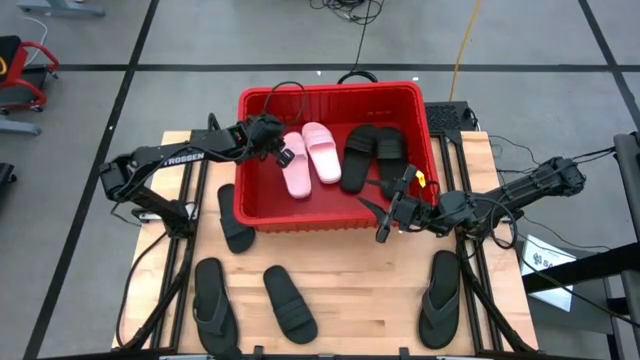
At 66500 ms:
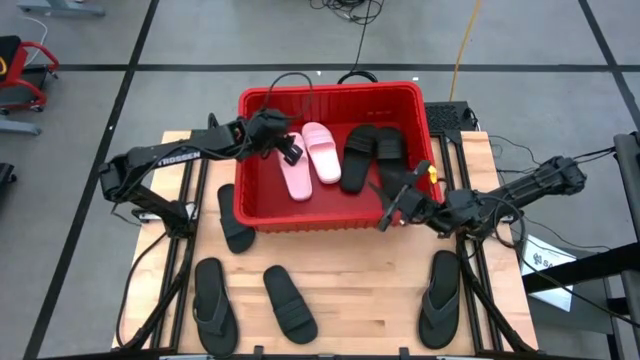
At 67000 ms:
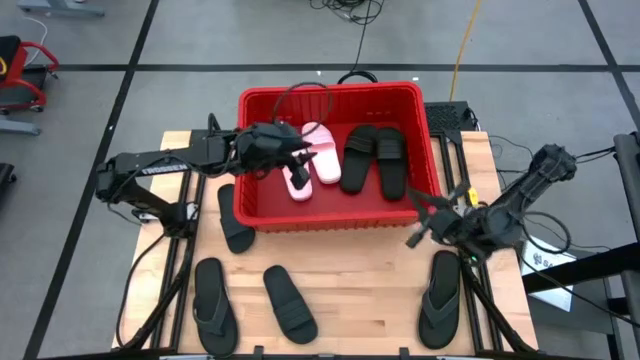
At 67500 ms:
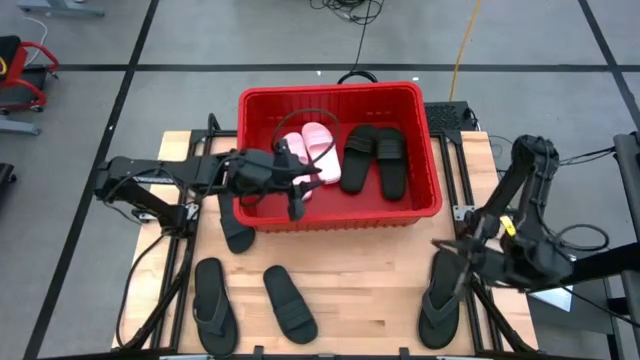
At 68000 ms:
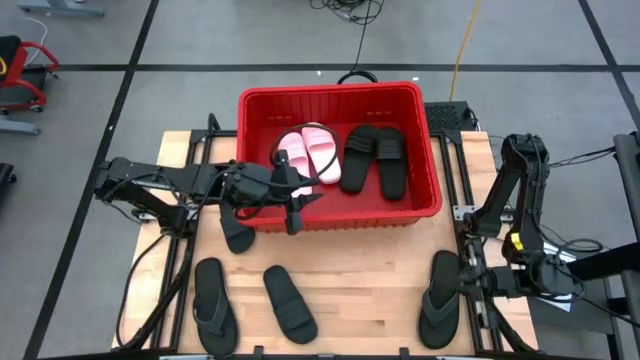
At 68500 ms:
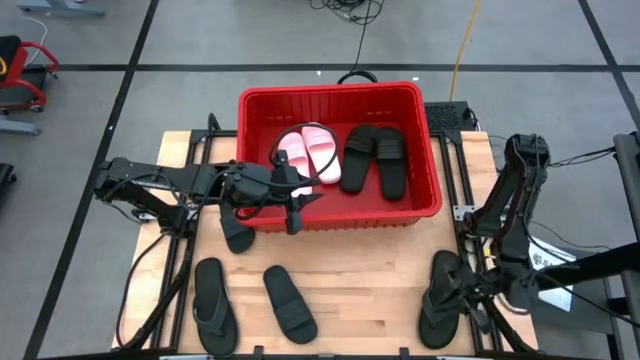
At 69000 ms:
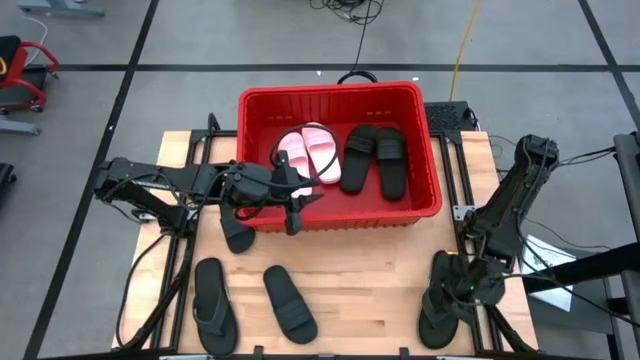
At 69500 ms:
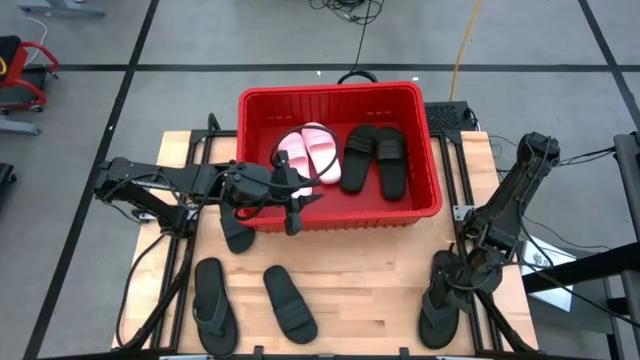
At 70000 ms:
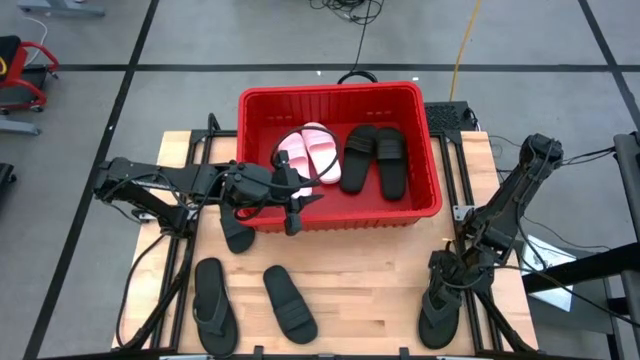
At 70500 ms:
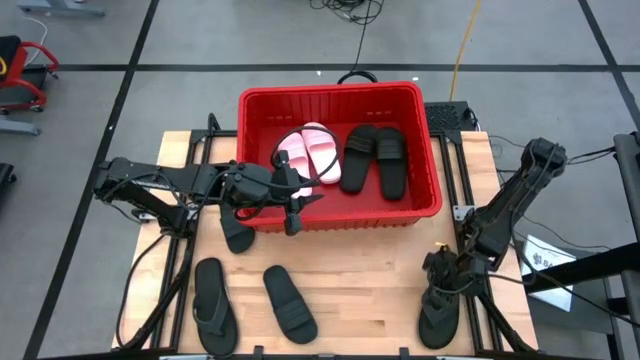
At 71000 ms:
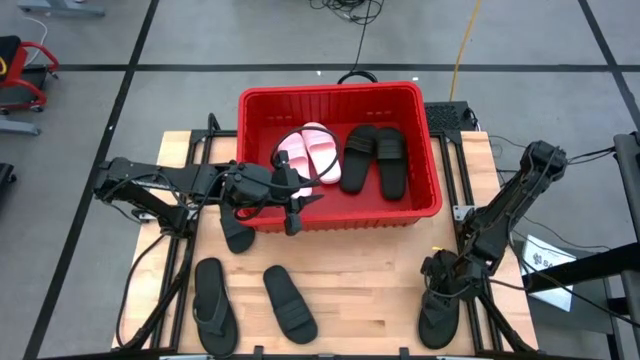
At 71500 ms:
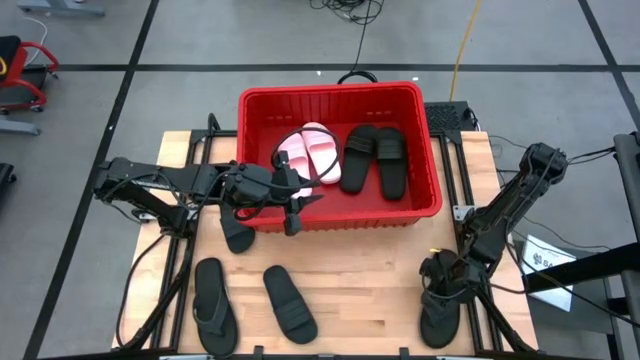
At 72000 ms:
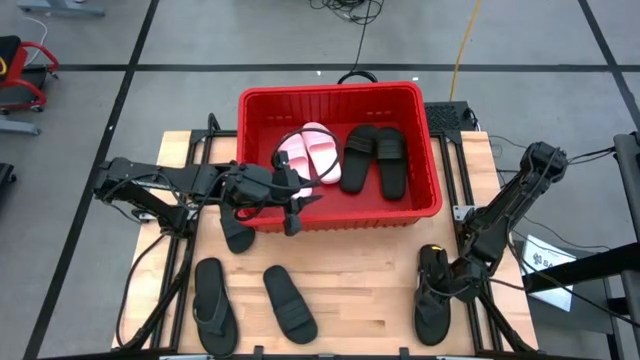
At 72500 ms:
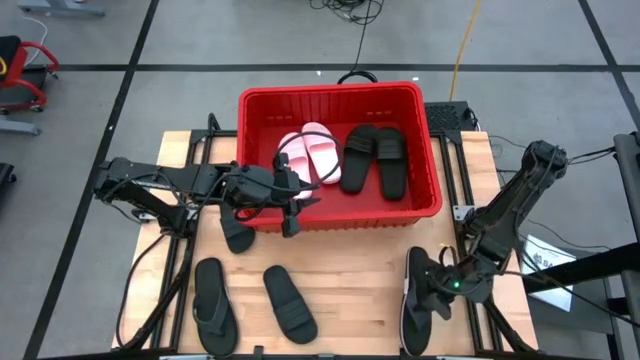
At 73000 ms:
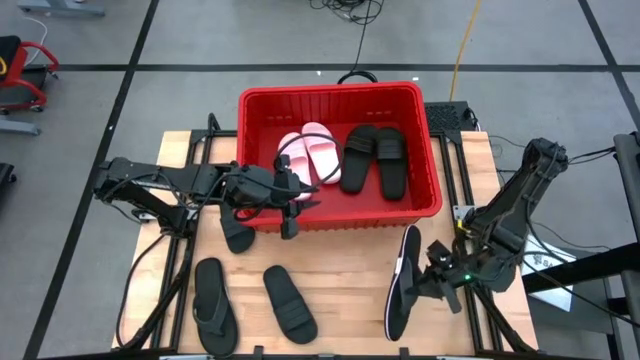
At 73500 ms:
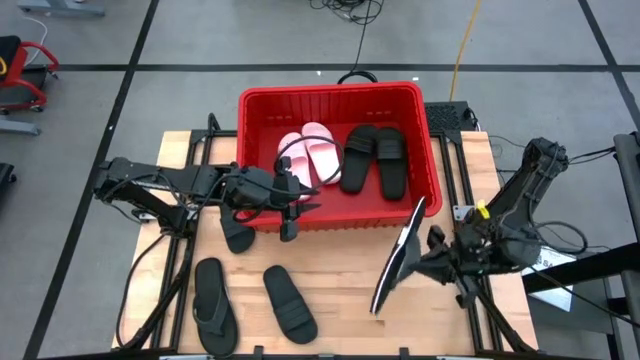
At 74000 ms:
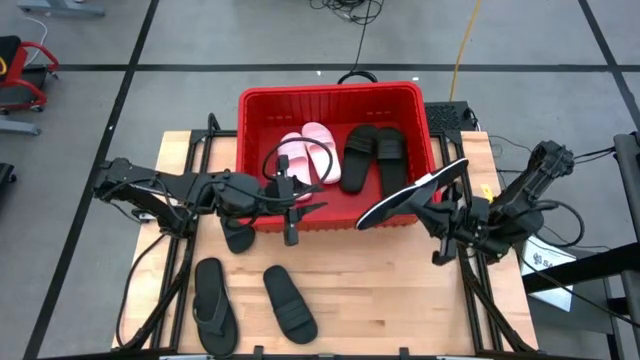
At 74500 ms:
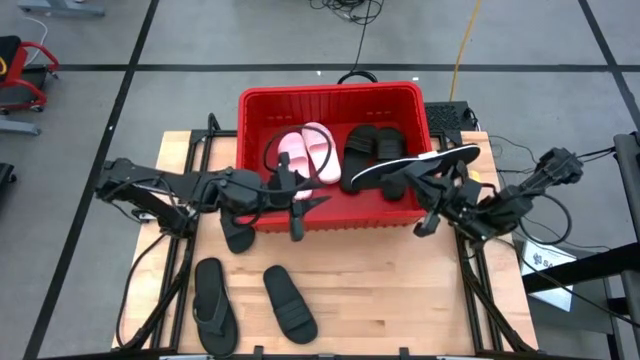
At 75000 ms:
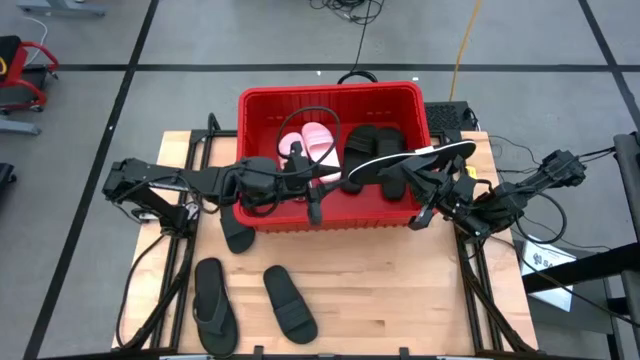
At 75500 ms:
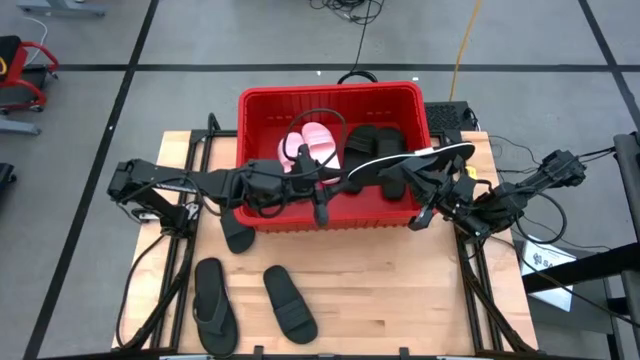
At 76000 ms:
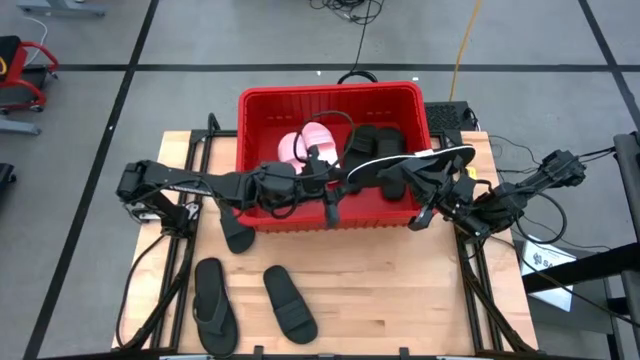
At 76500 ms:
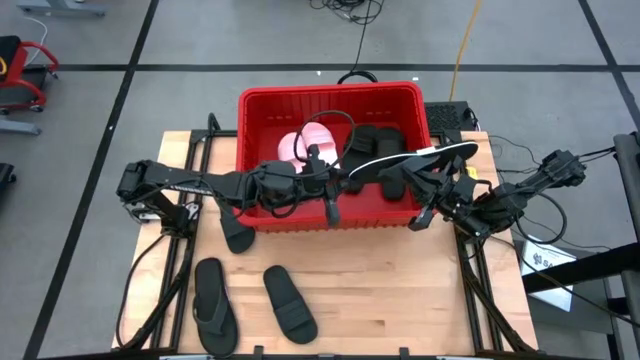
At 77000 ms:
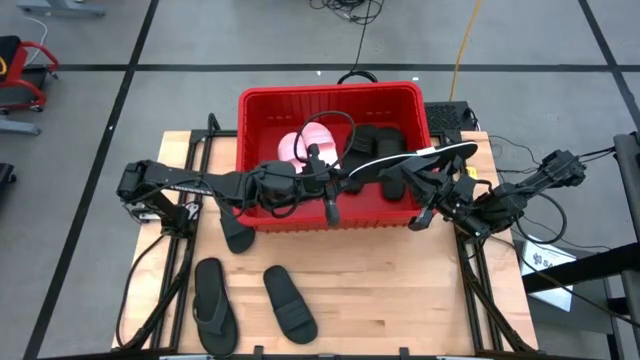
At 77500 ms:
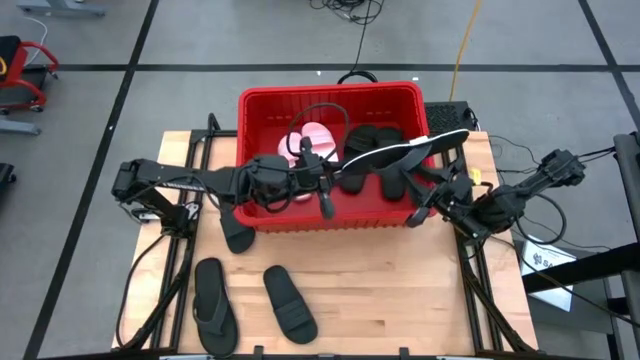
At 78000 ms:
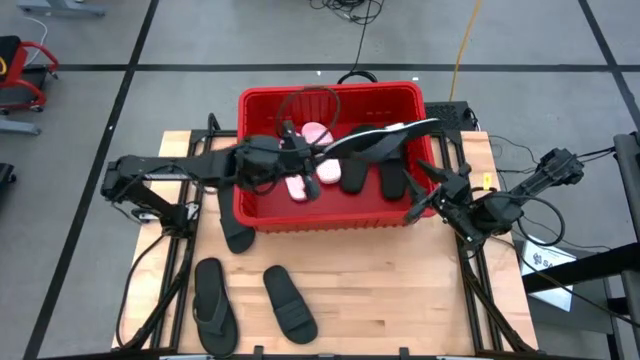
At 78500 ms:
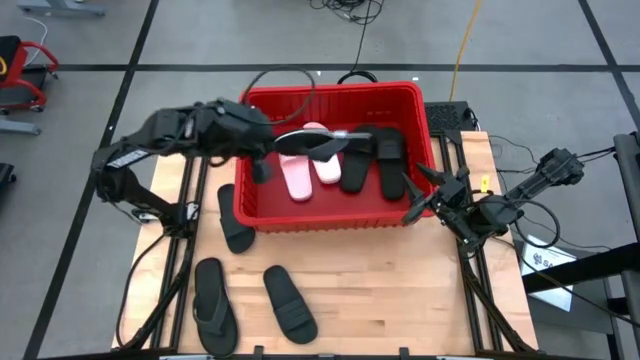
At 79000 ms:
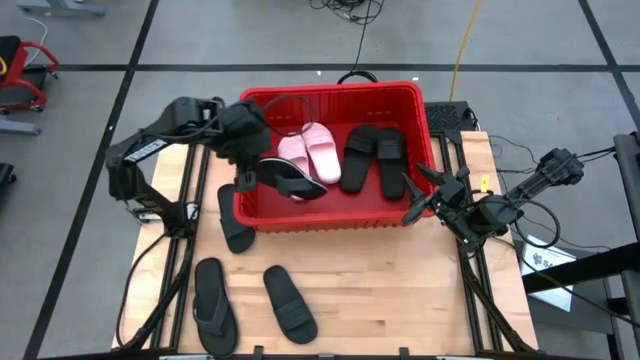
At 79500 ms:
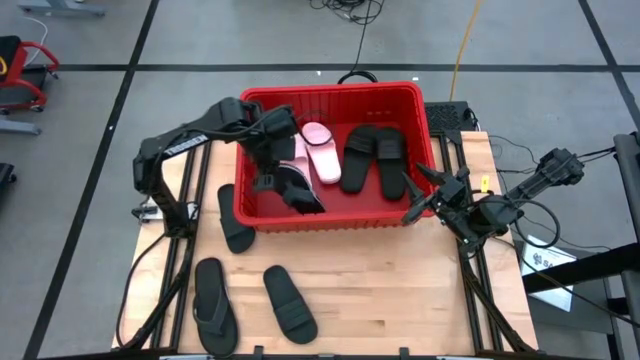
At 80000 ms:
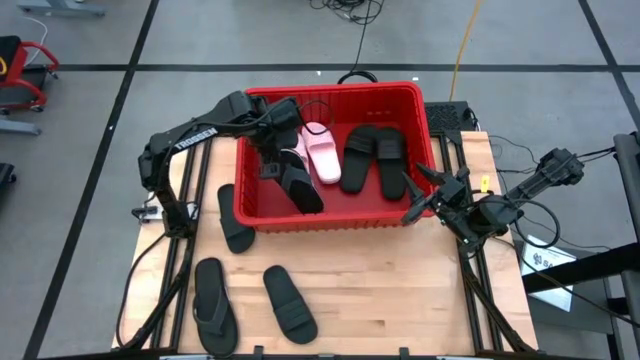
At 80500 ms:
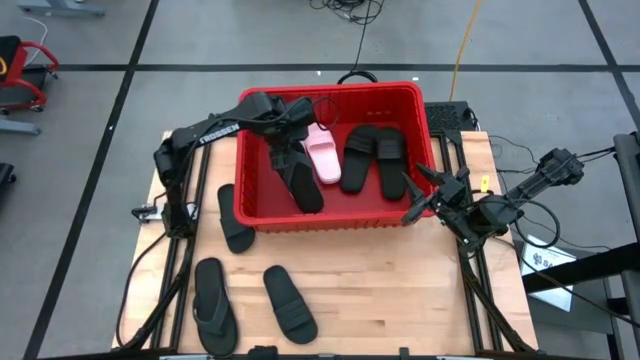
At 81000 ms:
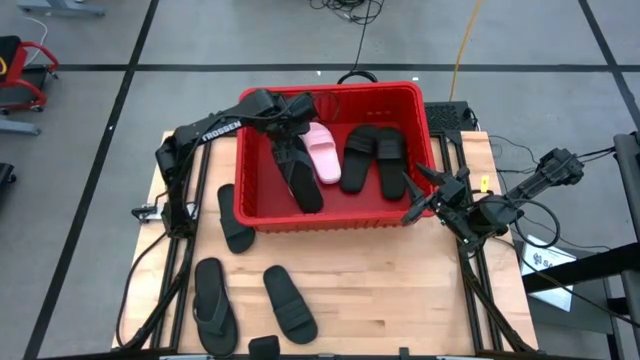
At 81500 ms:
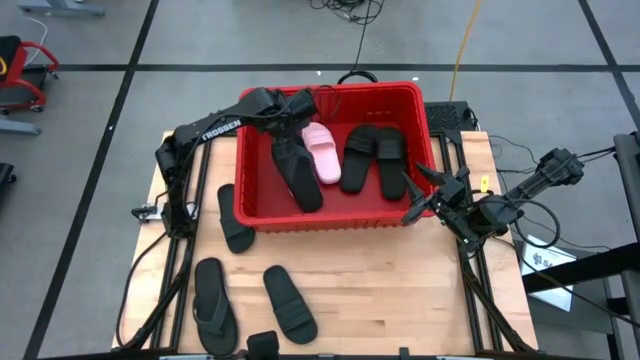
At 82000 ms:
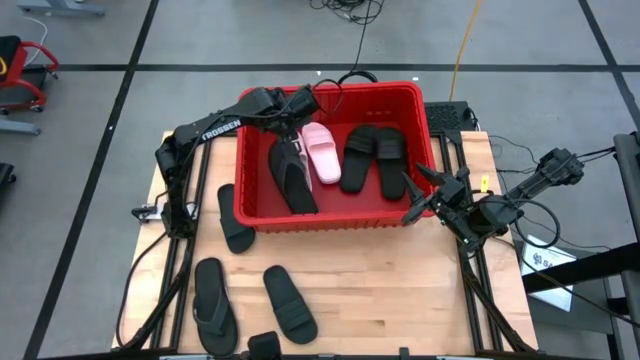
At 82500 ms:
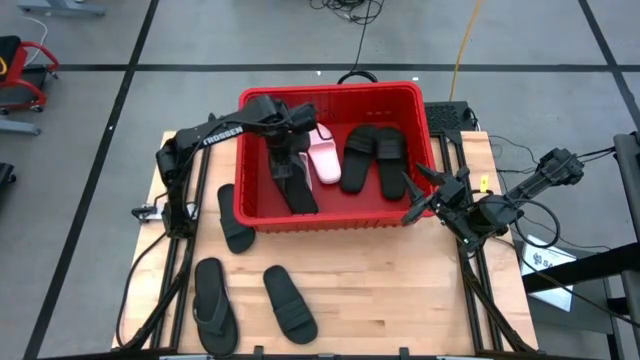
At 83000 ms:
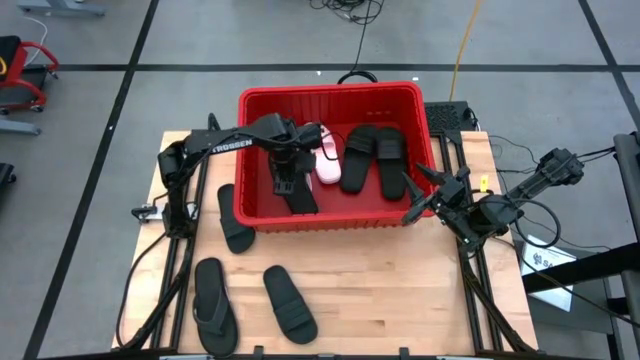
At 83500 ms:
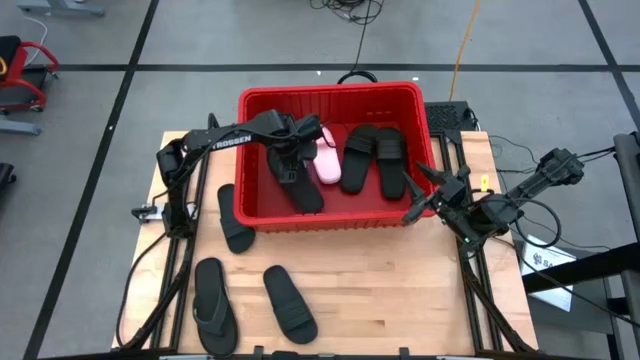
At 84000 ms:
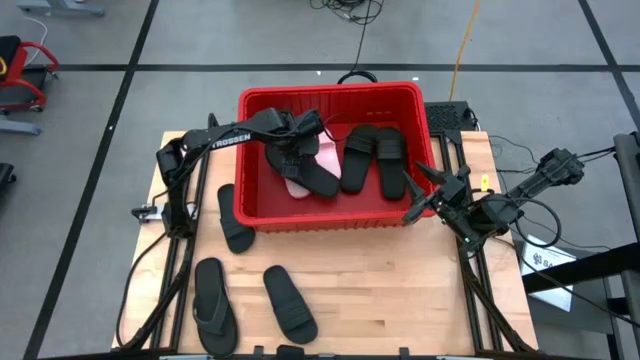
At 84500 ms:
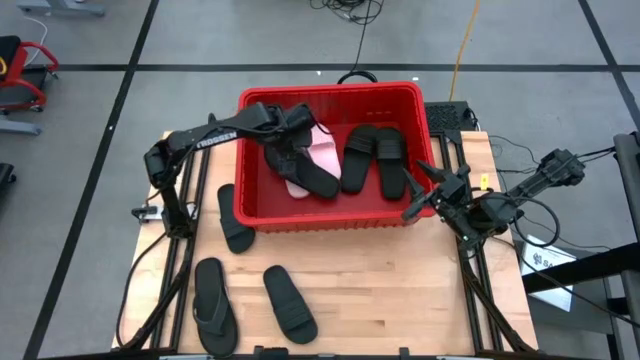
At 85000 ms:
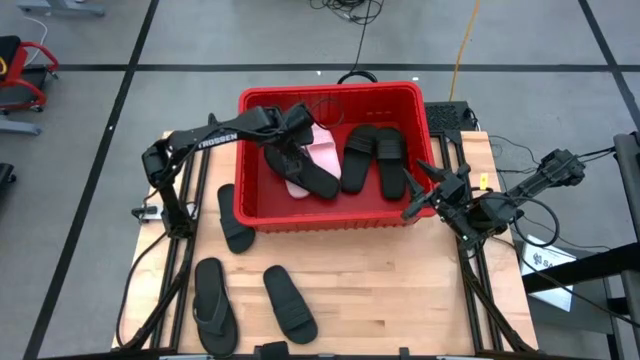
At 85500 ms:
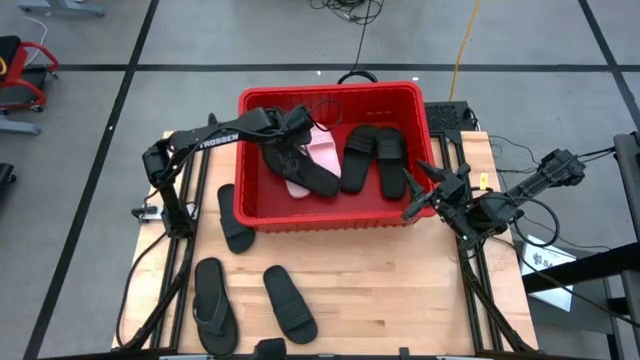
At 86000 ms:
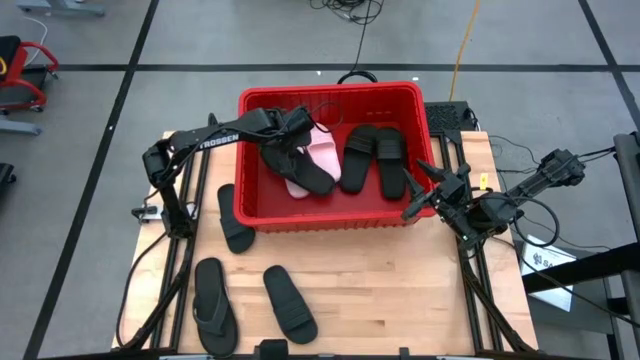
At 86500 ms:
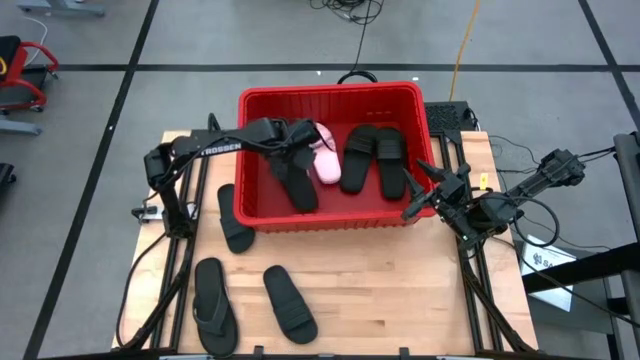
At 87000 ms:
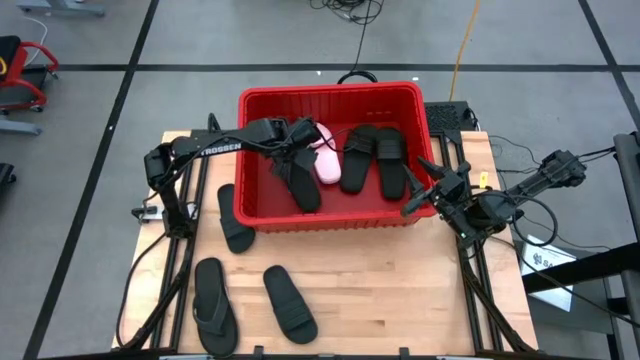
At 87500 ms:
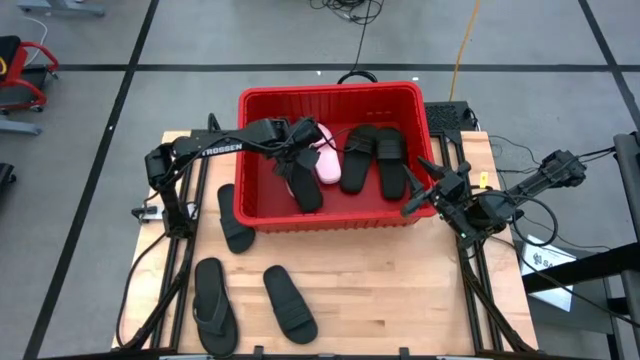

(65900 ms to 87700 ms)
Task: Pick and place slides into bin
Put the black slipper into the red bin
